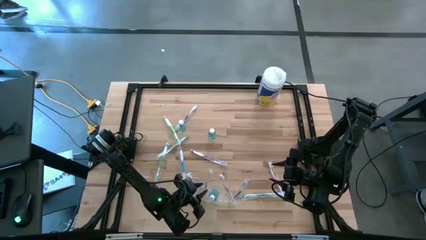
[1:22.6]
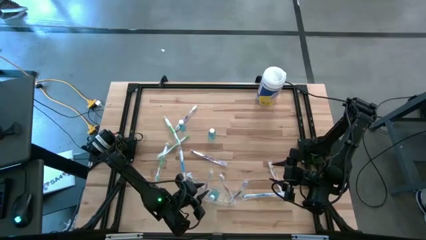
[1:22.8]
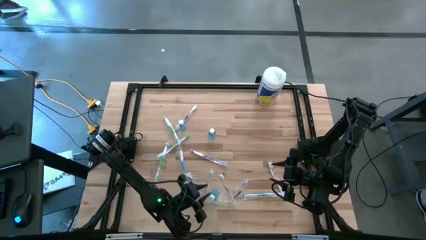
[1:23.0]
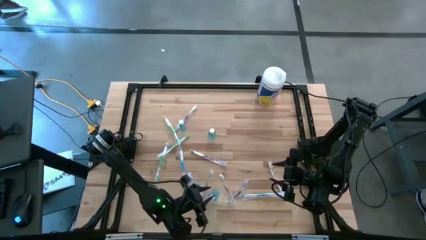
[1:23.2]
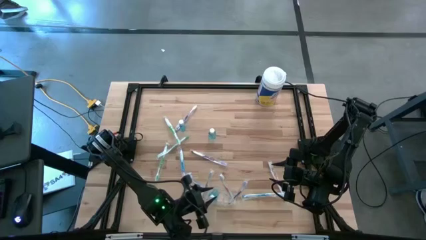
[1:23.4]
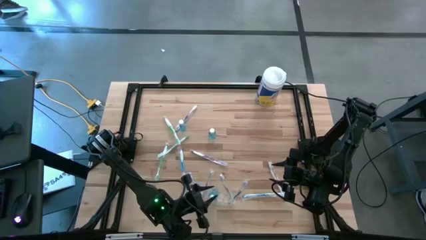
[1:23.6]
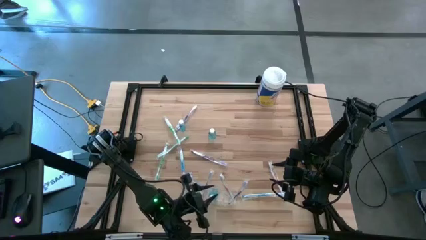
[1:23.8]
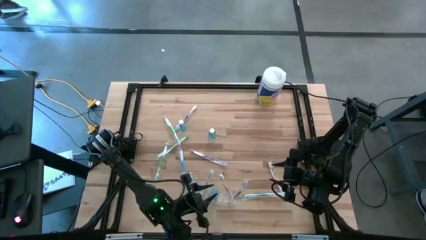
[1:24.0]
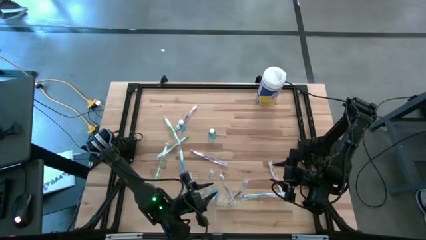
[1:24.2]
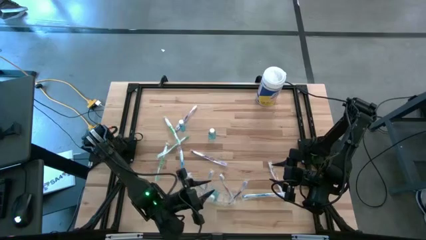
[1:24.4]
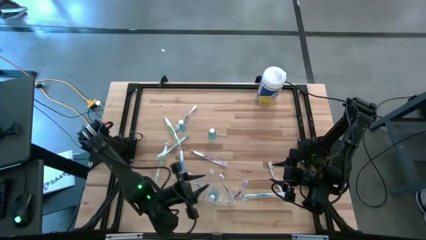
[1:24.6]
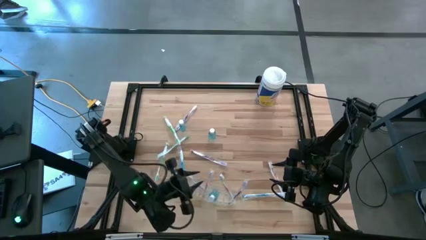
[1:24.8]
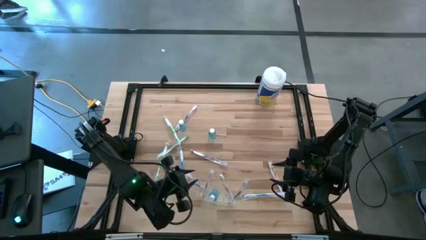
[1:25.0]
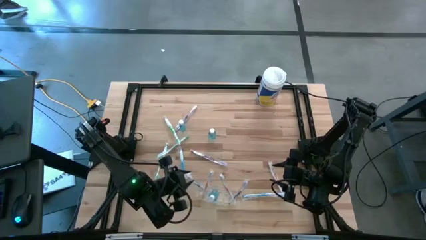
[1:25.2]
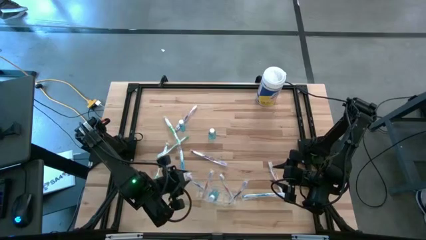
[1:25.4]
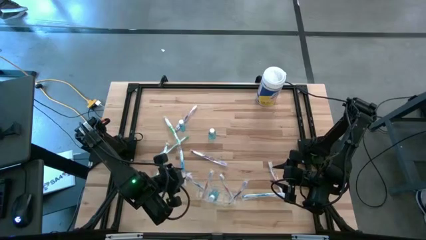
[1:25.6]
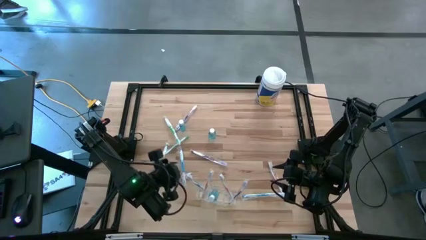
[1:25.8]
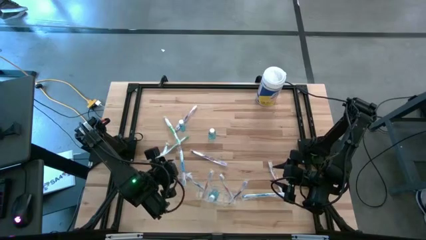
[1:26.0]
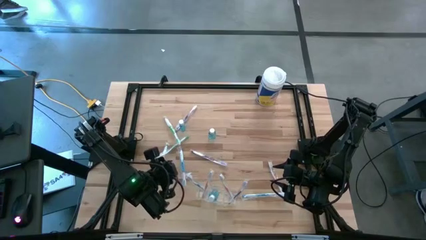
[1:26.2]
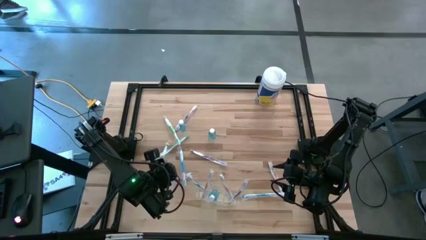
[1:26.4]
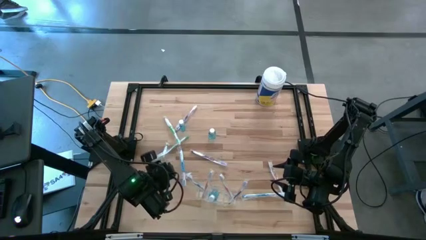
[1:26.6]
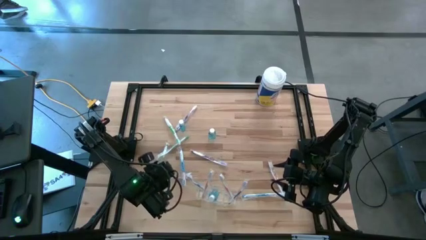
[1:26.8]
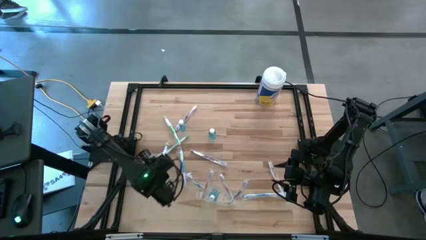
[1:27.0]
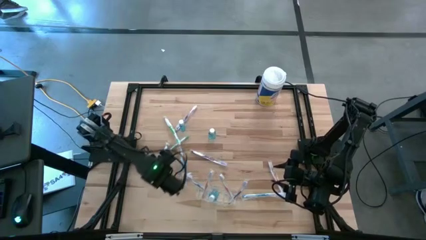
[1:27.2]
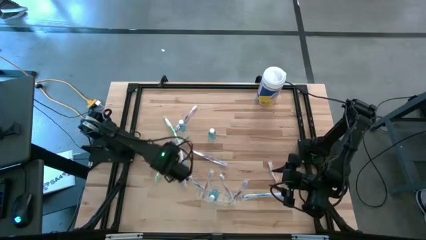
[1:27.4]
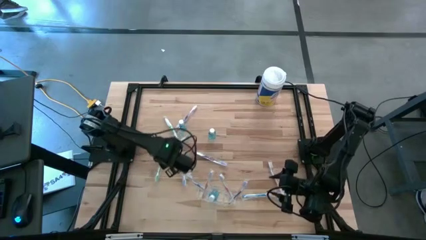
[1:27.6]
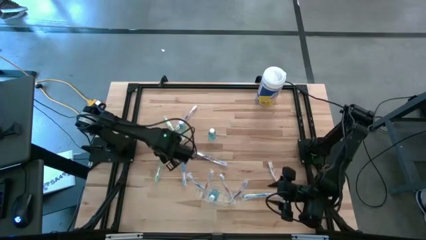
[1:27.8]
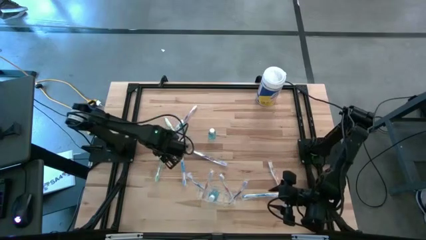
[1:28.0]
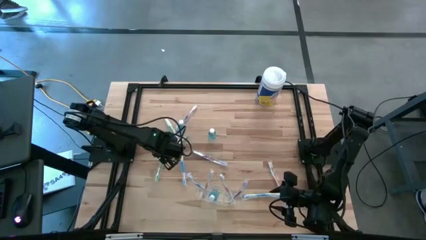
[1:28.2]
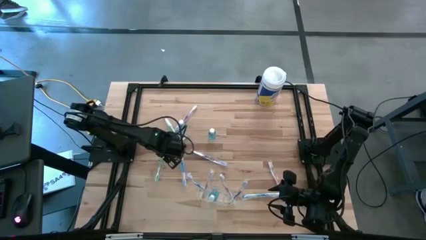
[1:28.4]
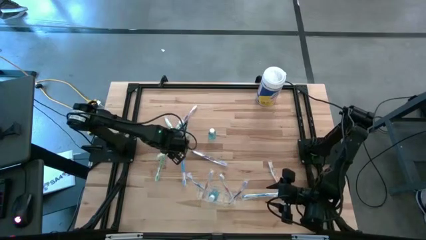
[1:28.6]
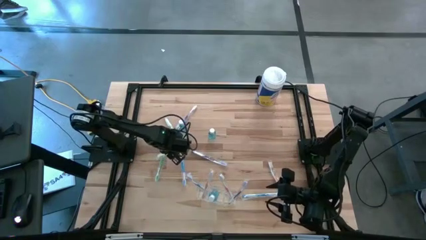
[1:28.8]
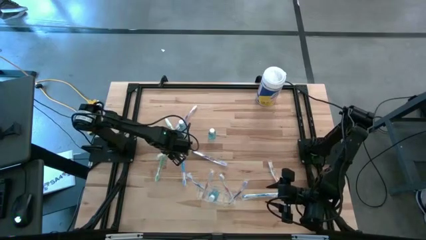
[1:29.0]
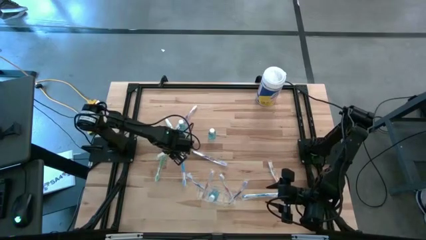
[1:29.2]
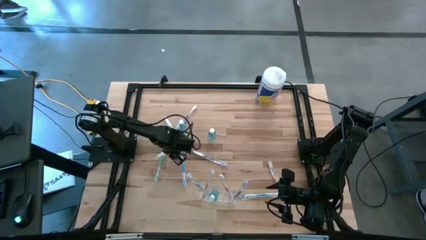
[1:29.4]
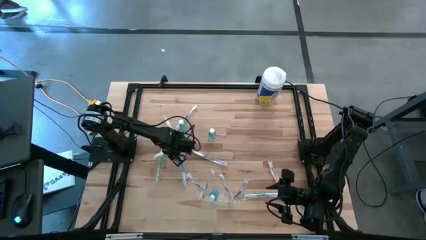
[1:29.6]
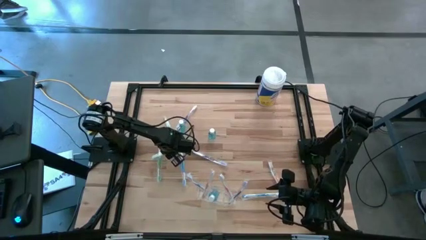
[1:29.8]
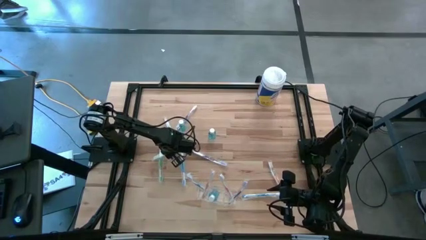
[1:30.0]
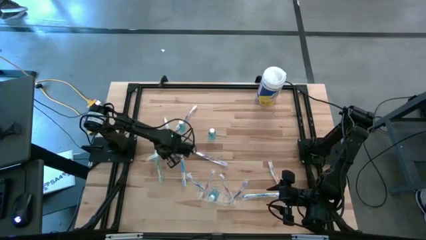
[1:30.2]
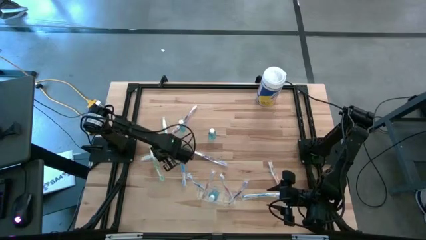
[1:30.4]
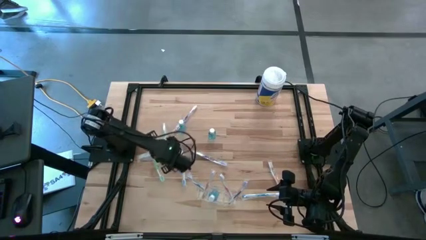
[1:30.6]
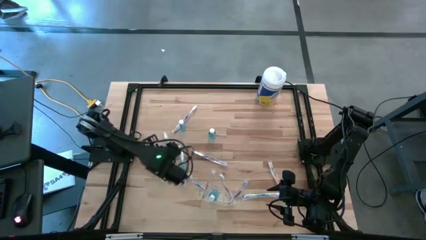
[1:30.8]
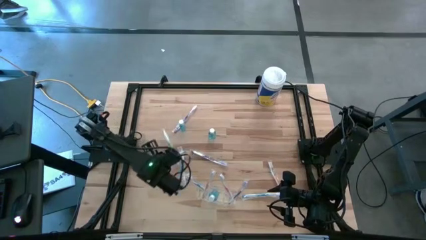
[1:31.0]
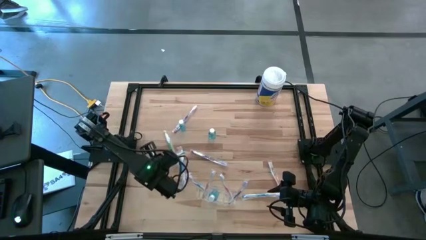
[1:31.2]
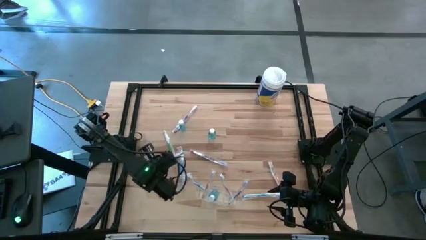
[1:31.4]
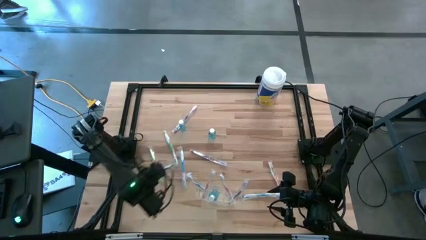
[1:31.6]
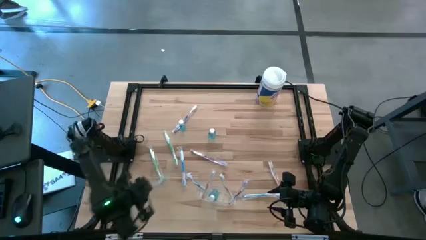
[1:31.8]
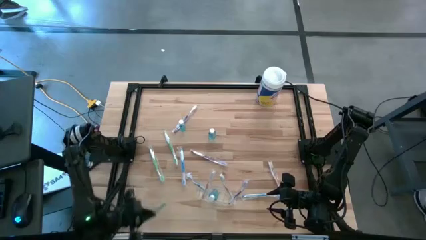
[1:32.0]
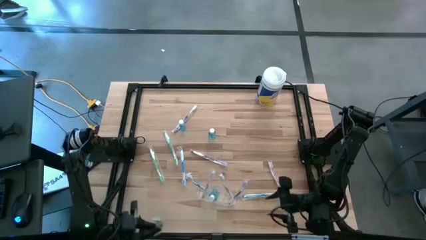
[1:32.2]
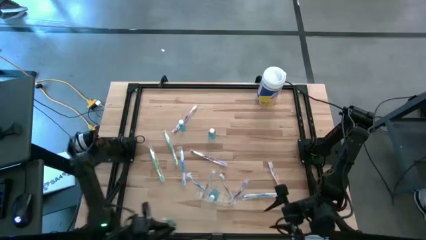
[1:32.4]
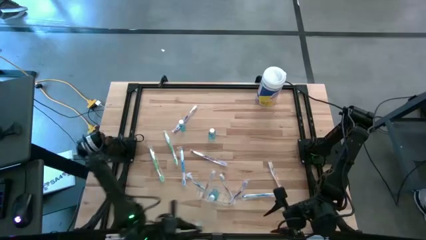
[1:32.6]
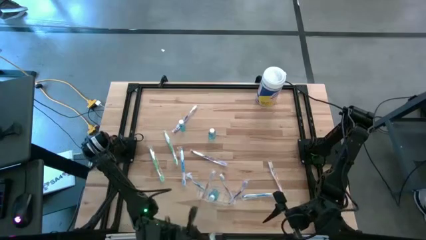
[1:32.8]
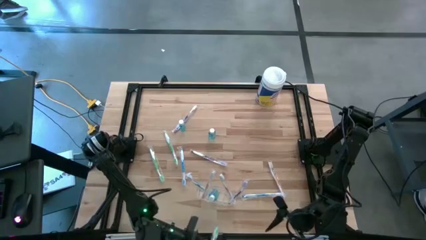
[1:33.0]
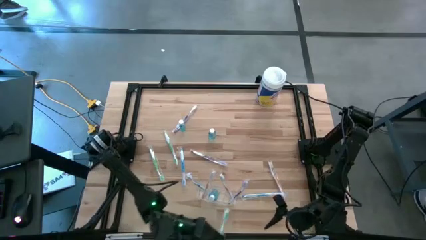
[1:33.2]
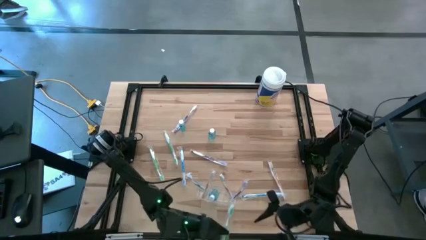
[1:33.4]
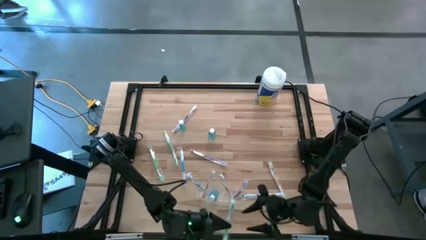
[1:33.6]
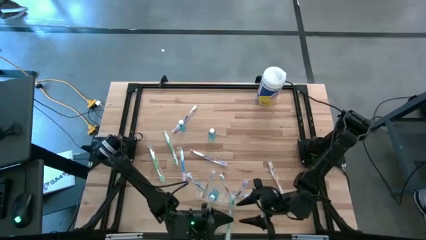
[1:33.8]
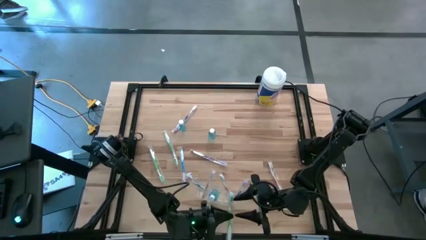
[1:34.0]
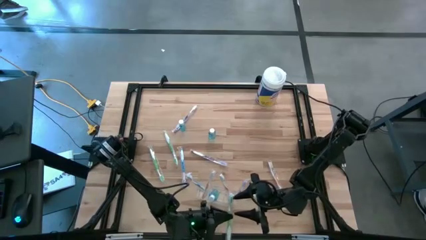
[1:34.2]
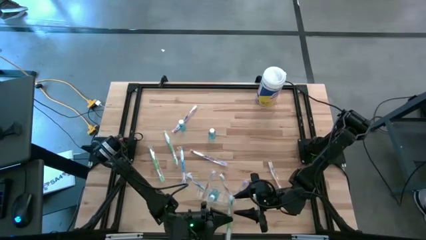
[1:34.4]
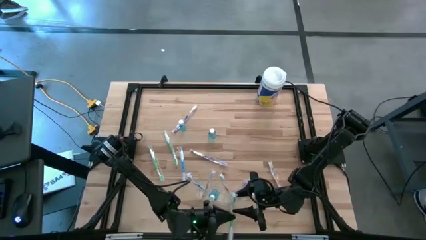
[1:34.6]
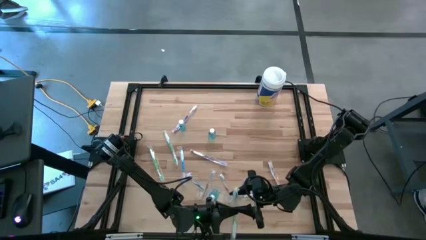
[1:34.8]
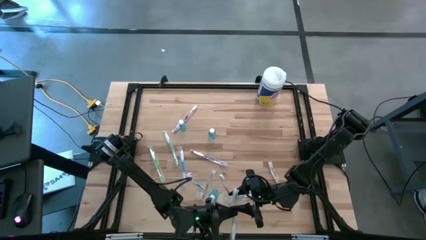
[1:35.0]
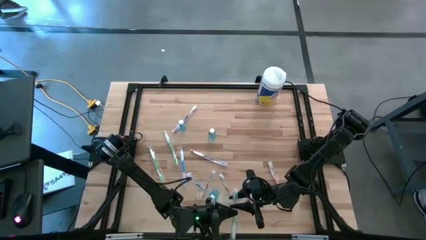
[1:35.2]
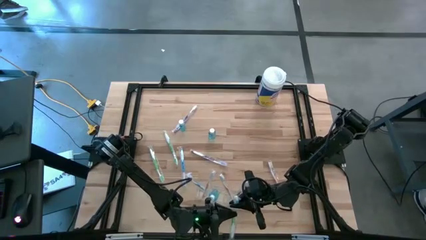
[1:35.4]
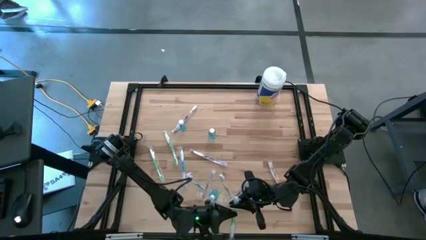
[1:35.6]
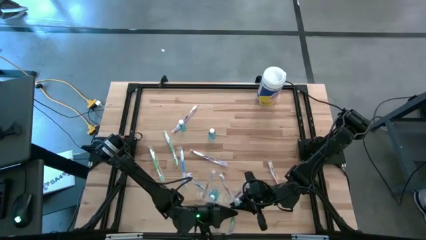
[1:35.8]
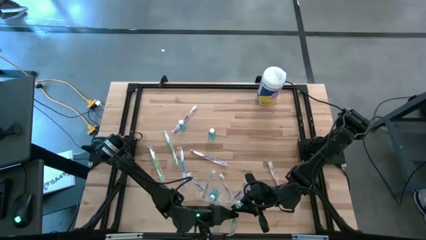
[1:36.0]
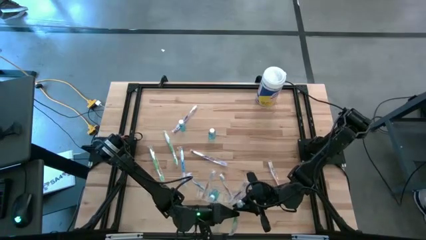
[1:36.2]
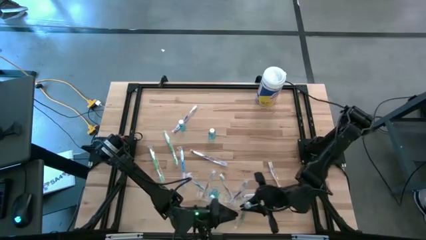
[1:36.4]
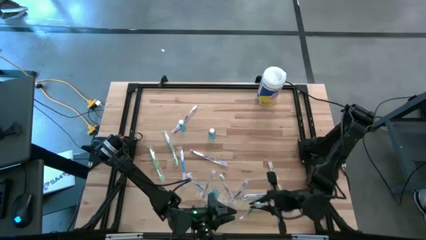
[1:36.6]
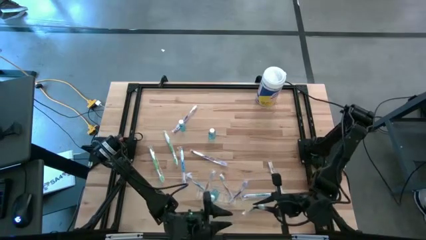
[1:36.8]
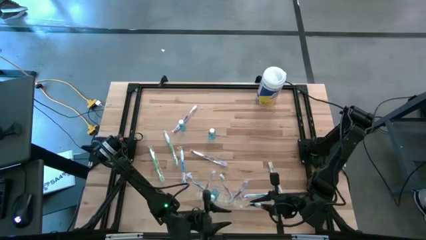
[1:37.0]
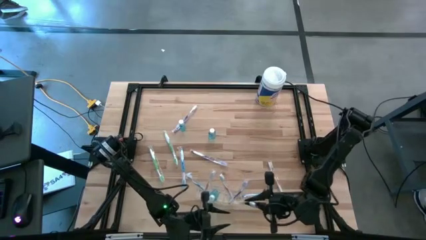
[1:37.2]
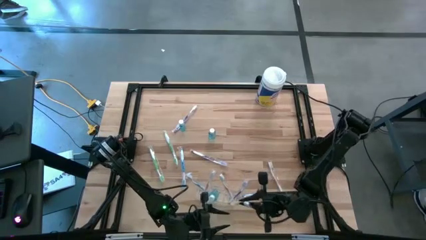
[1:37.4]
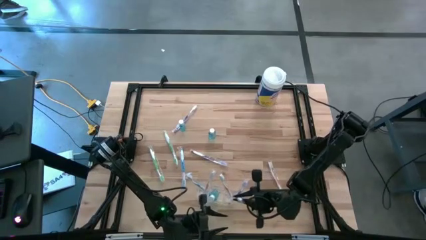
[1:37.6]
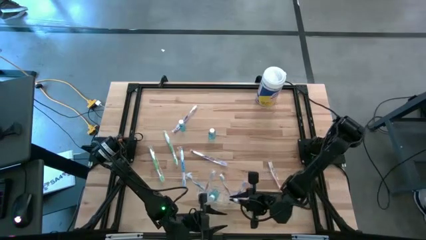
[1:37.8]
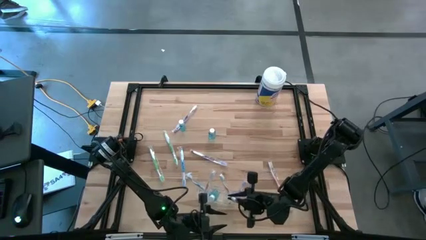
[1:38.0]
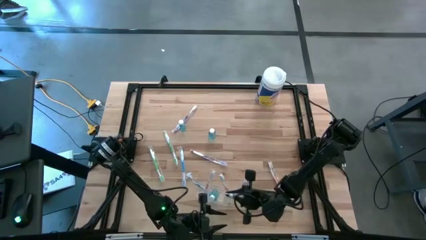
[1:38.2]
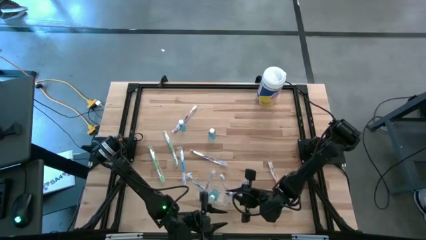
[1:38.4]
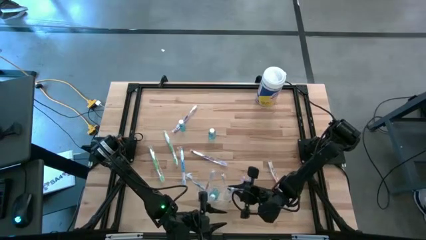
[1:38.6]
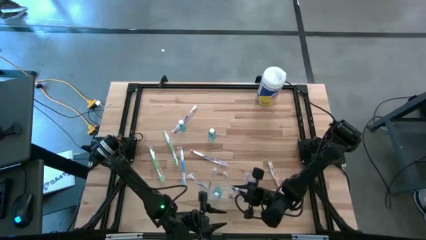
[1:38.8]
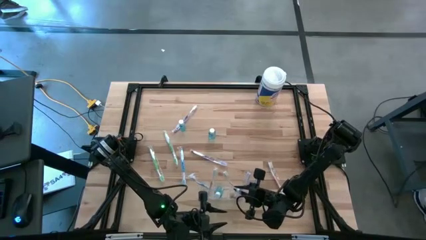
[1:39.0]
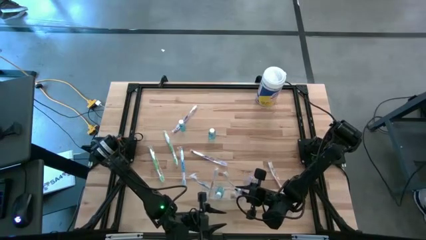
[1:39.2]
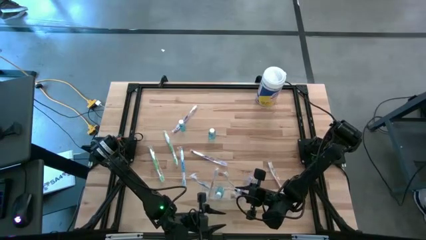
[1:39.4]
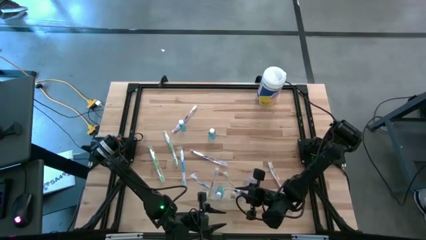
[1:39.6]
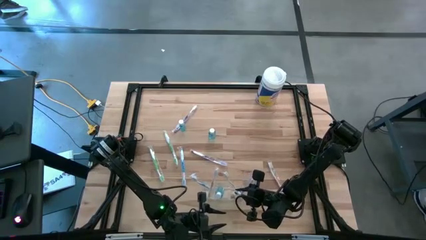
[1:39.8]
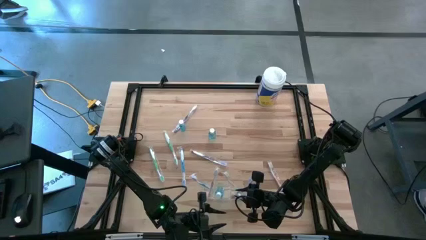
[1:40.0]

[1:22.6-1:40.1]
Task: Pick & Place toothbrushing station
Put the green toothbrush into the transparent organizer
